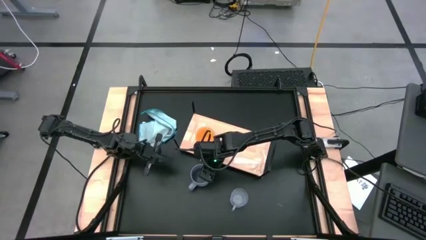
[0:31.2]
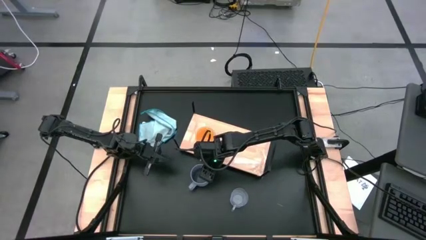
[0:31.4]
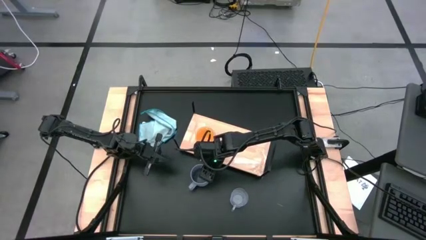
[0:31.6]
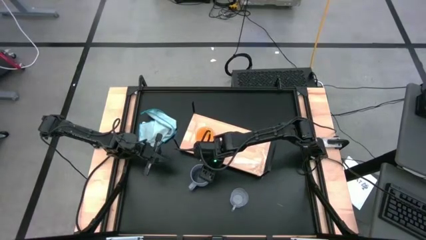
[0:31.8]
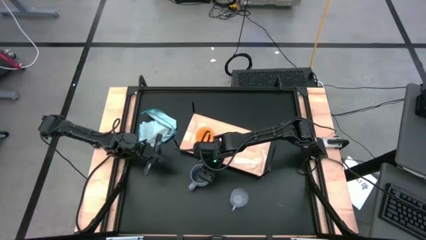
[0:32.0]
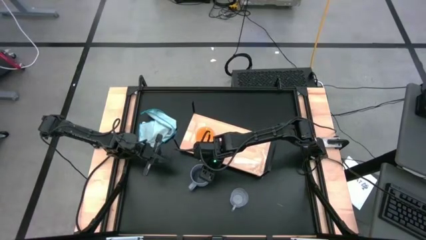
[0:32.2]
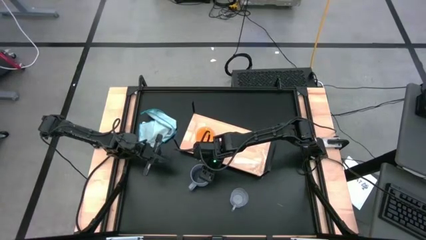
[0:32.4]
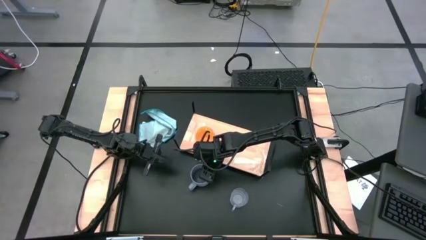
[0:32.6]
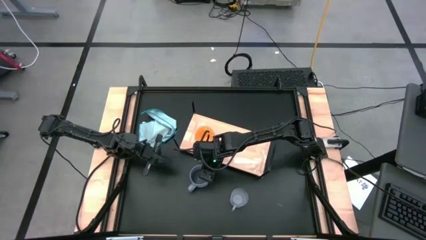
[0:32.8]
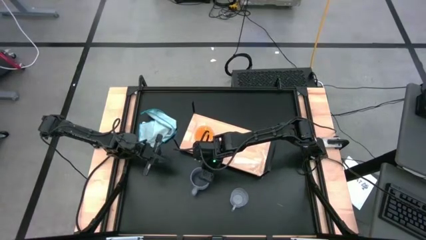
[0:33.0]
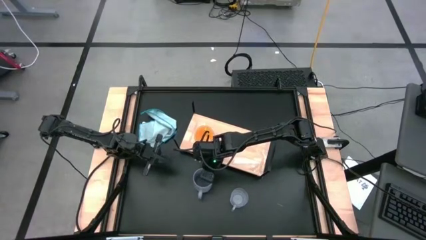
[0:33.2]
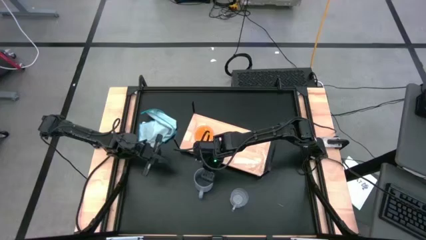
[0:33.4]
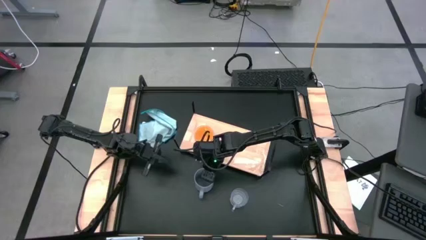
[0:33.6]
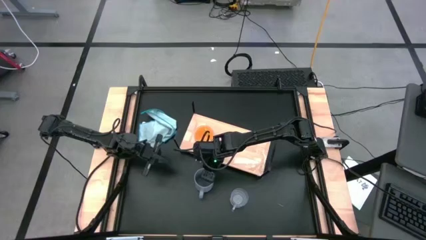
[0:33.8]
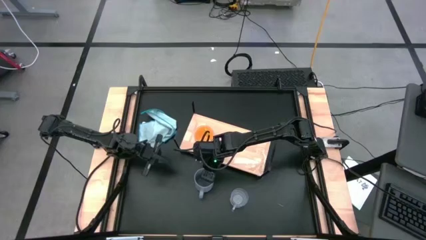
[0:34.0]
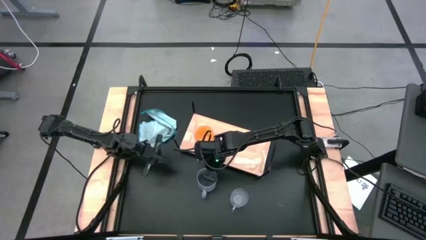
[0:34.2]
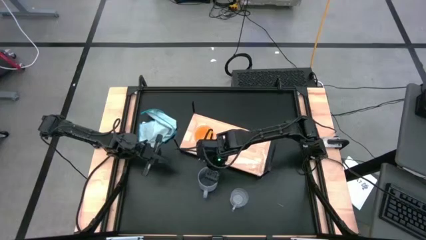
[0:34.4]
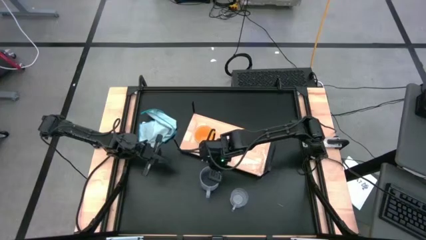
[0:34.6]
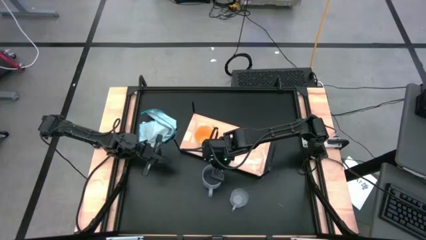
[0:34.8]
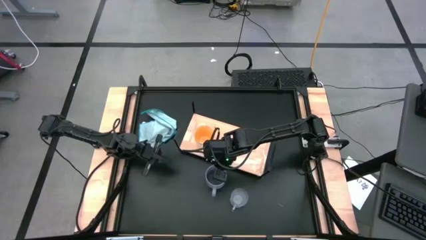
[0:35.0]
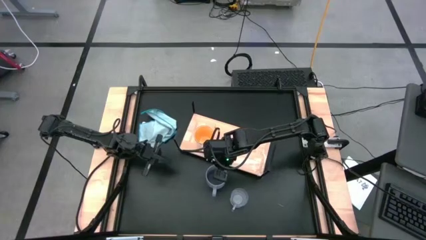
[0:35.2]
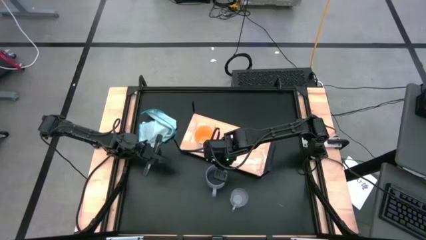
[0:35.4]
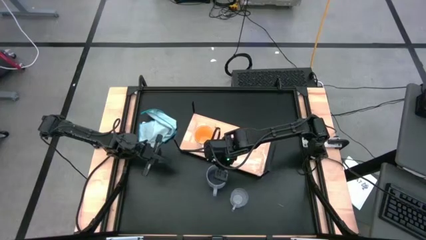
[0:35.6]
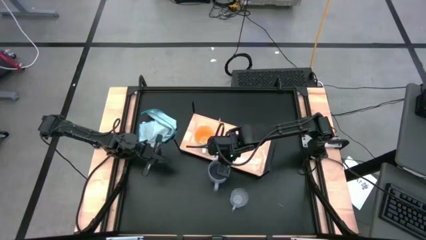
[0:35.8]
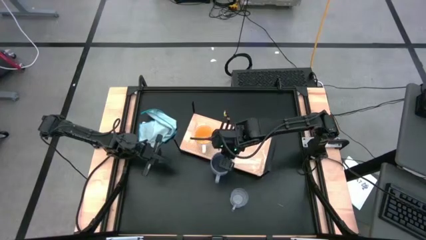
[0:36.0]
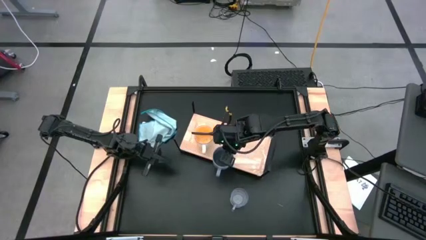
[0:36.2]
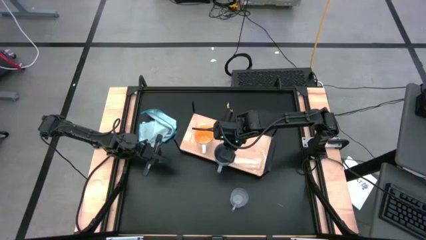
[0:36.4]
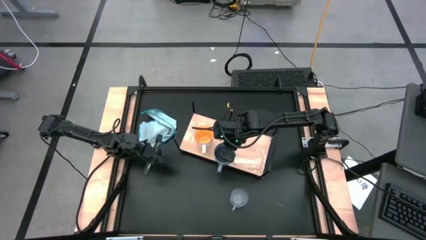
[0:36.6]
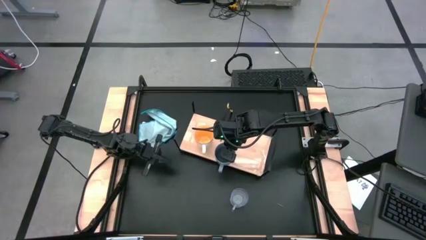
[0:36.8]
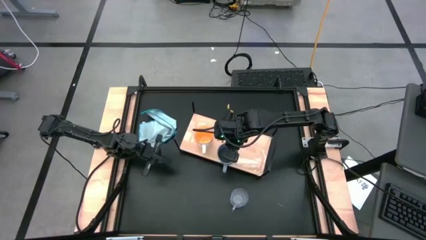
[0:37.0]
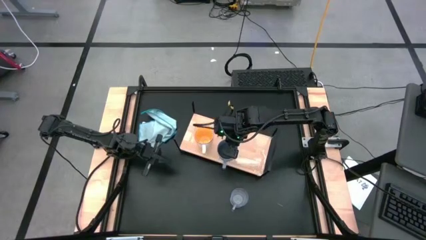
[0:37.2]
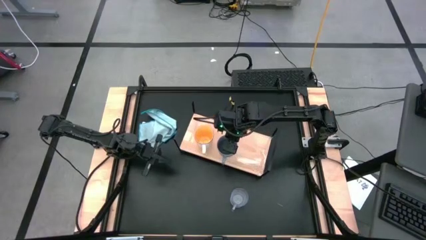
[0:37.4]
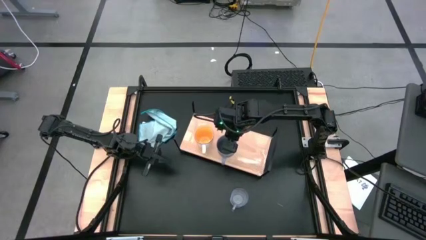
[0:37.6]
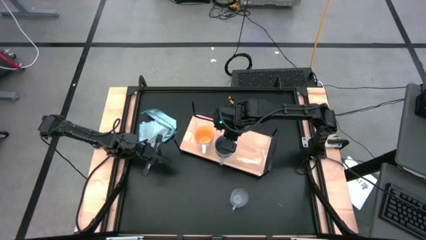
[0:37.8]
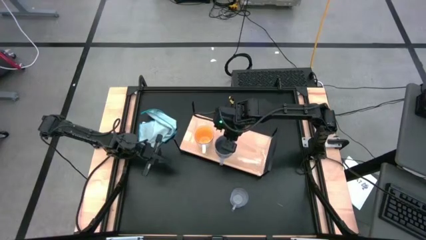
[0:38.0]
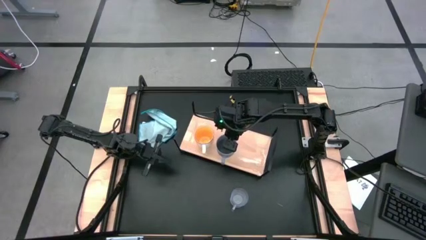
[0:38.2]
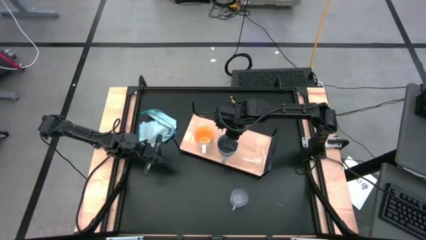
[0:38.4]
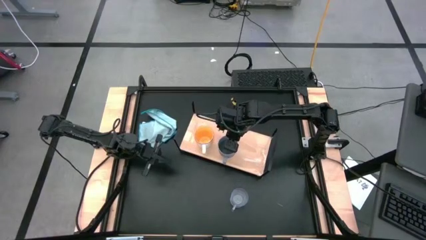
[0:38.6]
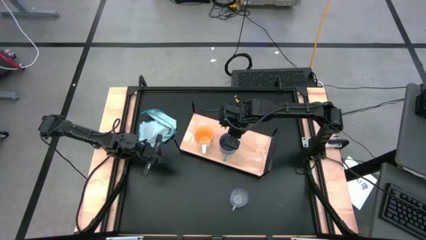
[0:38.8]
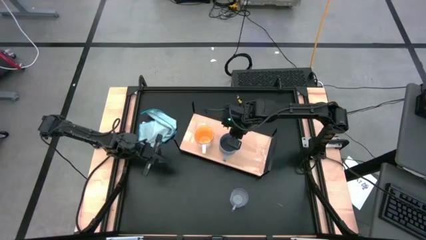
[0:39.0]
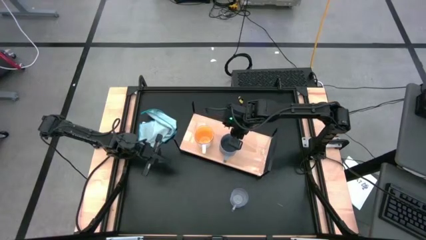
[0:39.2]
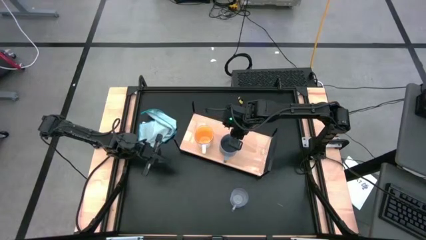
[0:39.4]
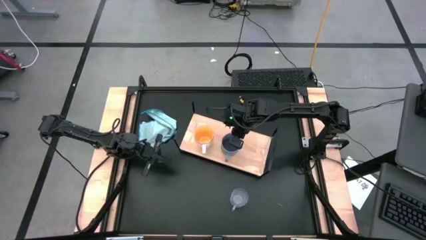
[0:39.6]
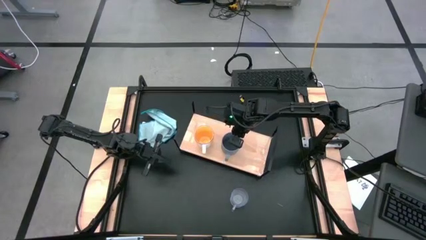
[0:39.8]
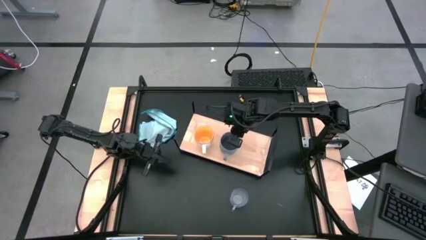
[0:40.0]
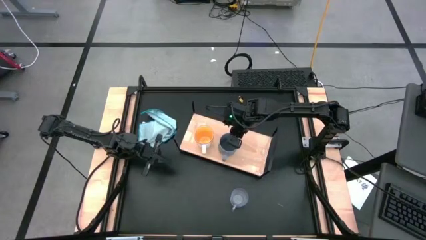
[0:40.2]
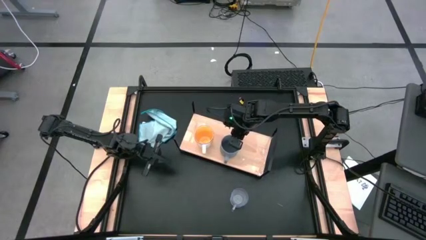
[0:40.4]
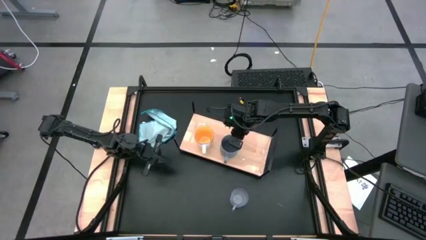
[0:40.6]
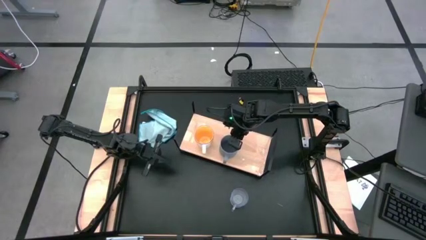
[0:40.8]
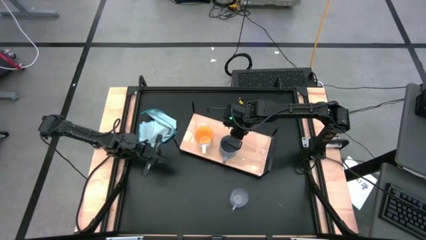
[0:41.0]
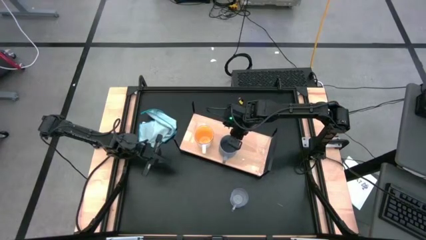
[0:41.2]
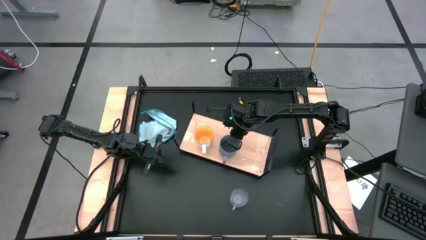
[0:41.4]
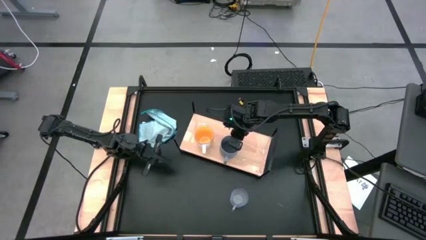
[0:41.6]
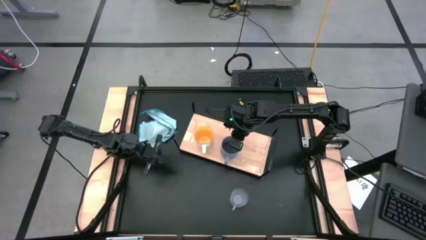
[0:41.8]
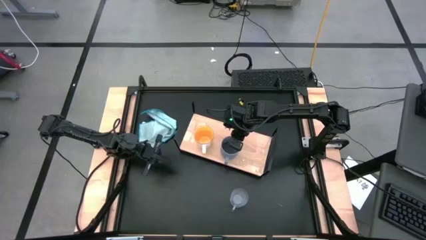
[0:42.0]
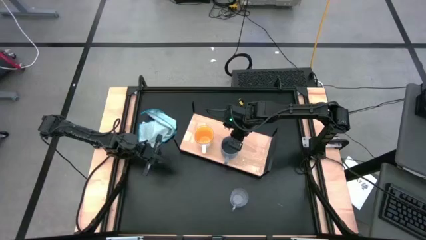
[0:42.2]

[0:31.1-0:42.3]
Task: Stack small to large cups/mugs on shelf
Put the gray cup on the shelf
